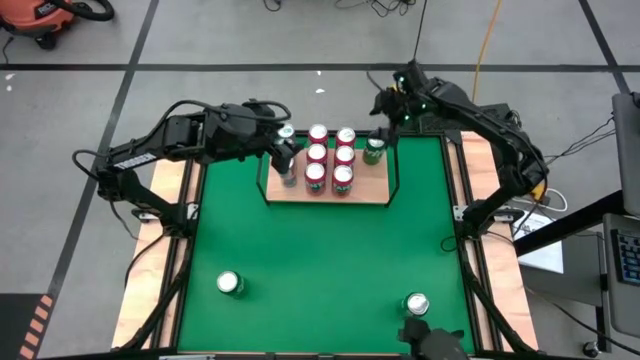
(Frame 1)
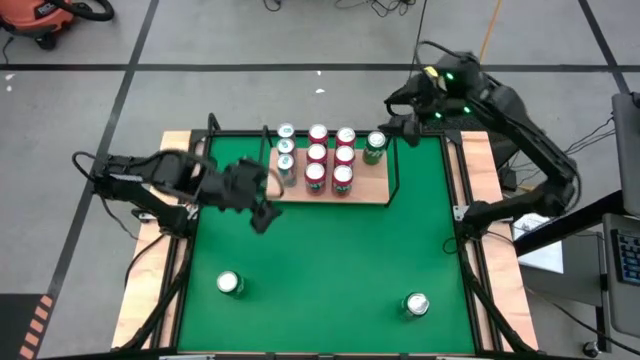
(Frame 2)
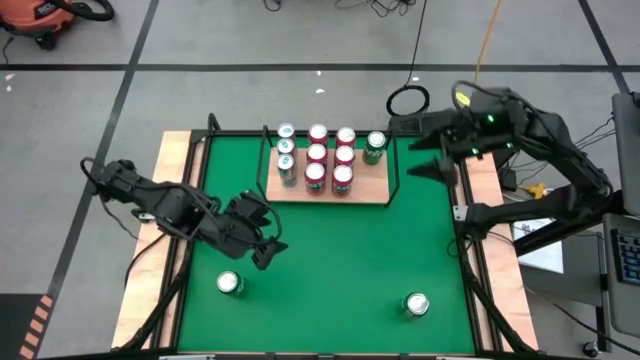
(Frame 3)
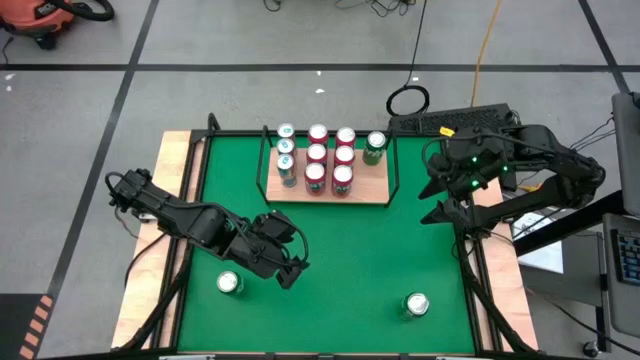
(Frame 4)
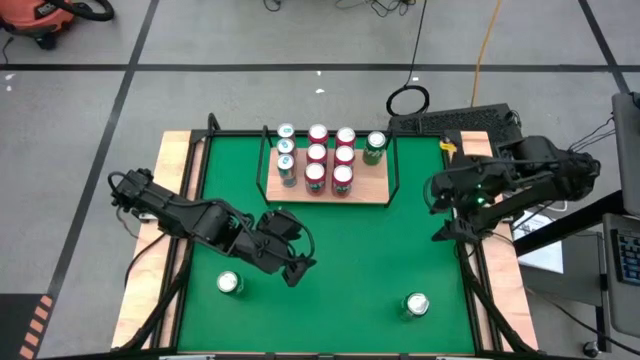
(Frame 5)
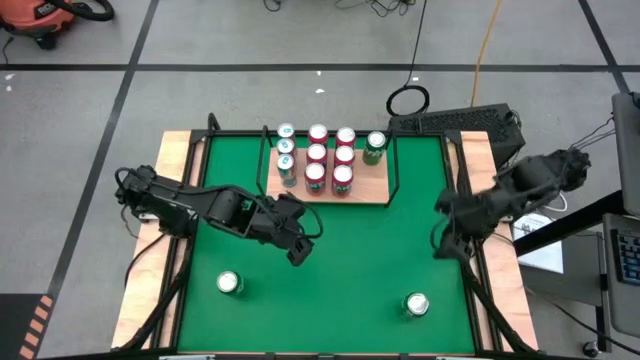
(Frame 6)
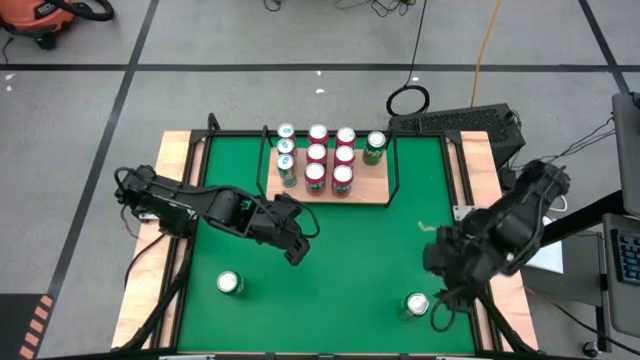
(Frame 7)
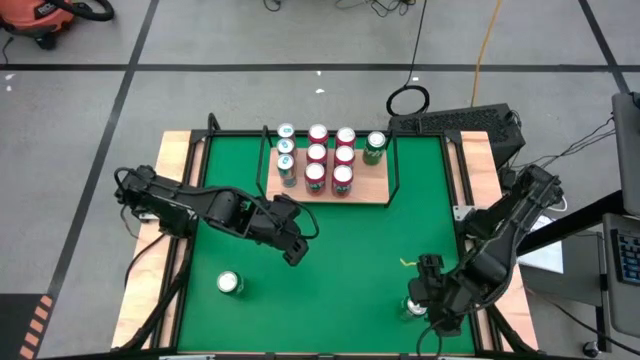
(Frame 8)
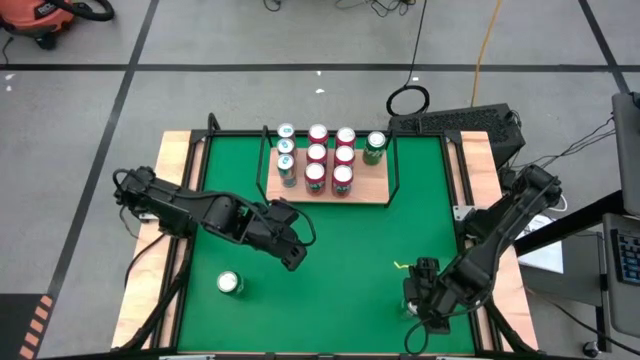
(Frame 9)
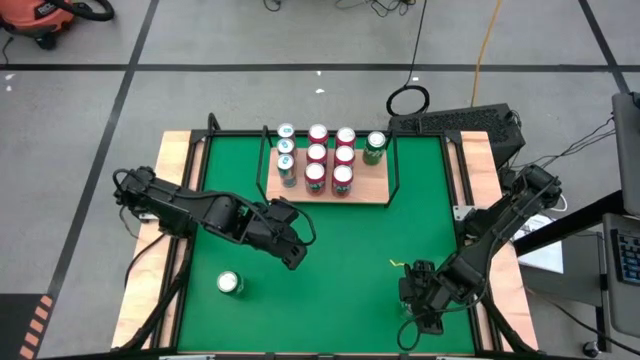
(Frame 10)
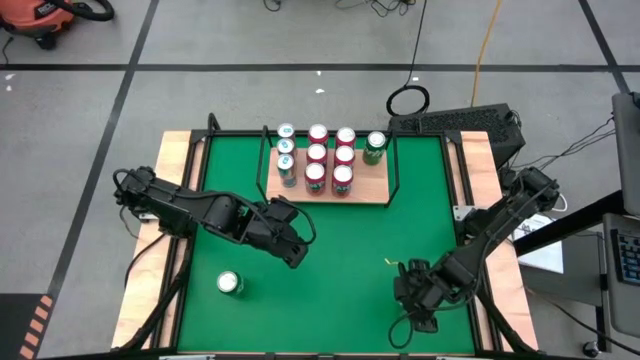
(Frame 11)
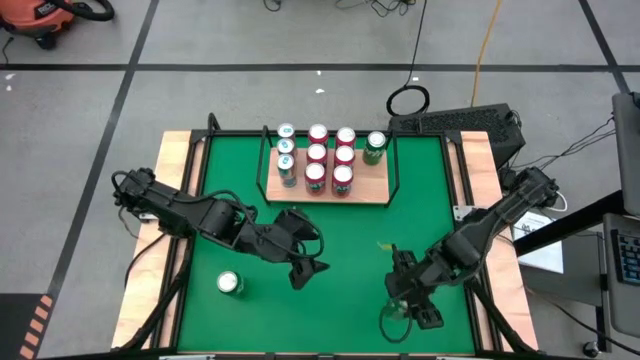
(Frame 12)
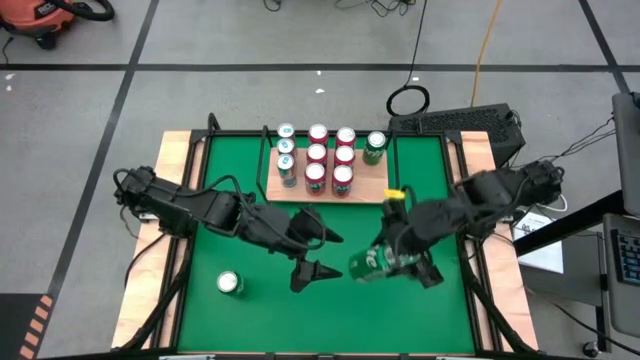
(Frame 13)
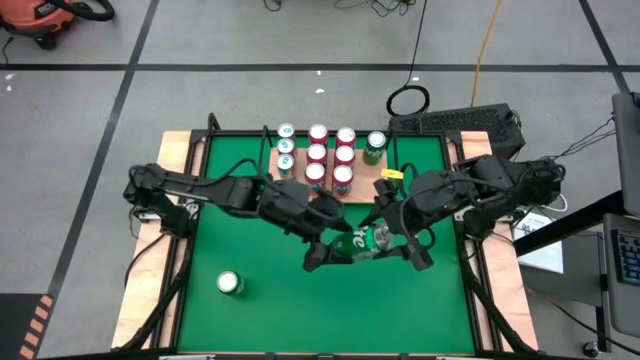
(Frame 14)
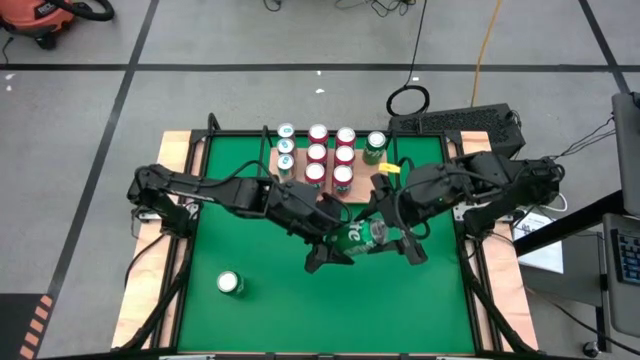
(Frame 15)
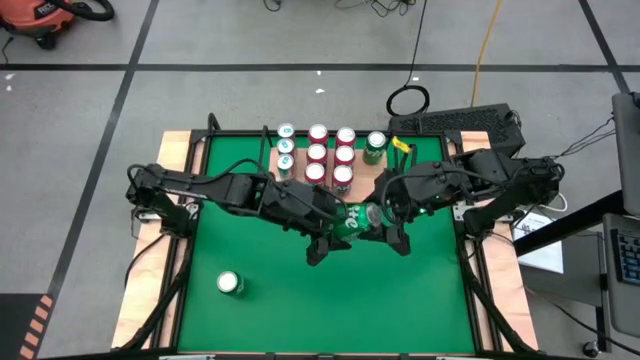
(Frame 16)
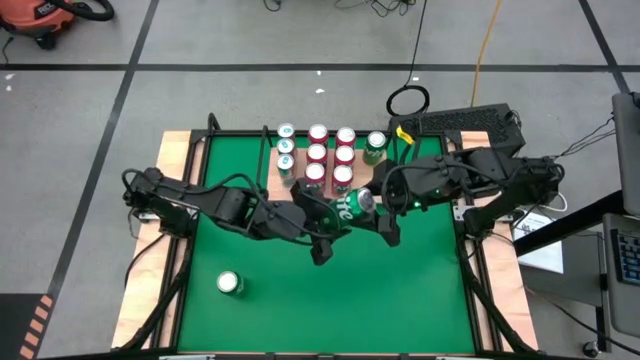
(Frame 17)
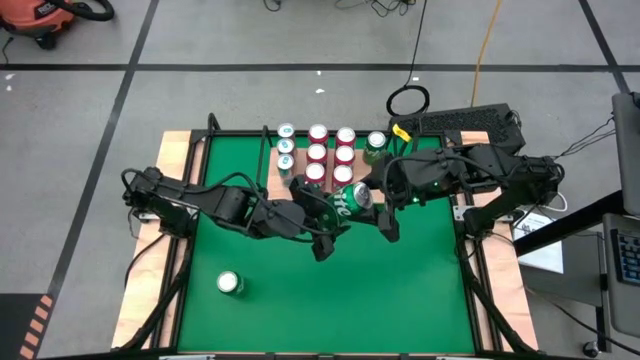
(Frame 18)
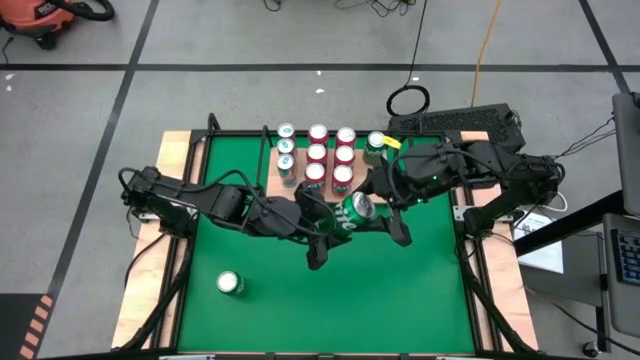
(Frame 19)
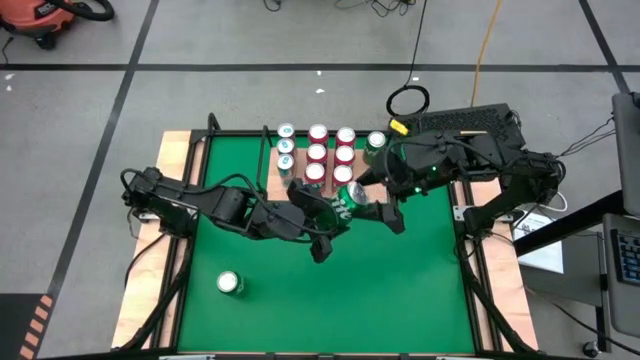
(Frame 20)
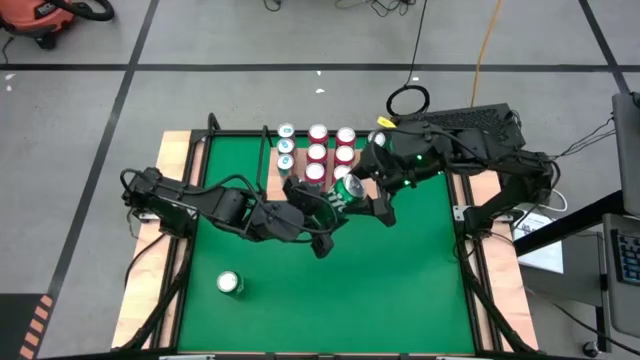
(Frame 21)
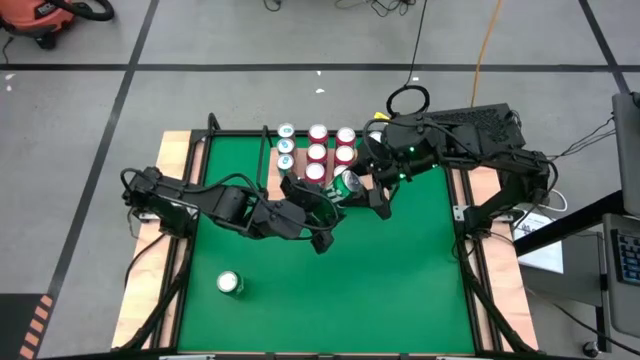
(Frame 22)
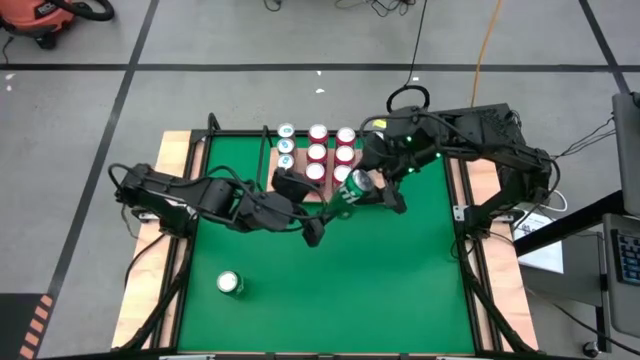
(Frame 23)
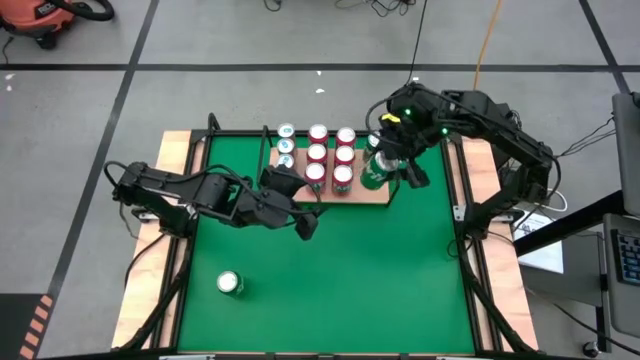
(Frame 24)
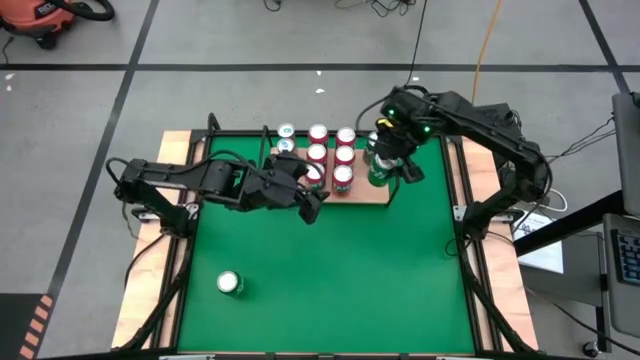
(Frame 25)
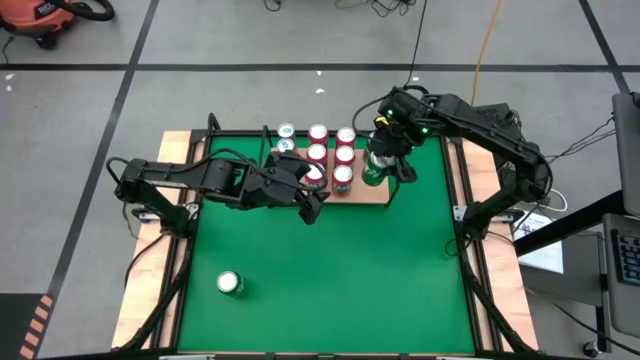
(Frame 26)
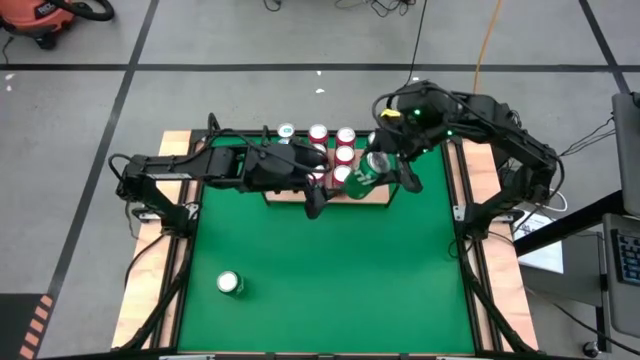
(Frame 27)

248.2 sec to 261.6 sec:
Task: Place canned beverage on shelf
Put the green soda can on the shelf aligned with the other green soda can

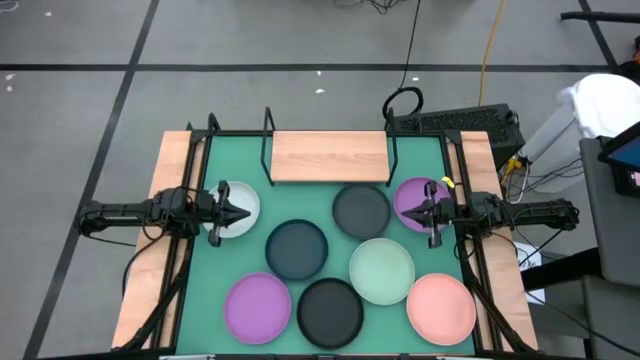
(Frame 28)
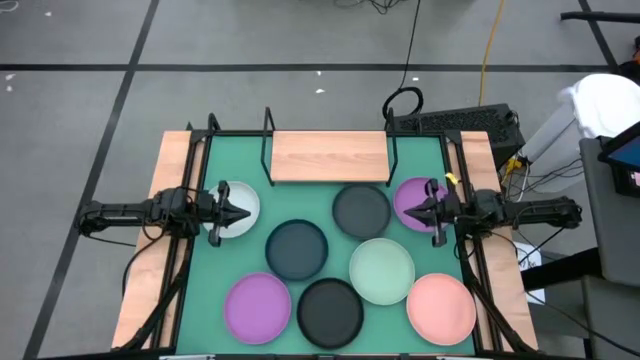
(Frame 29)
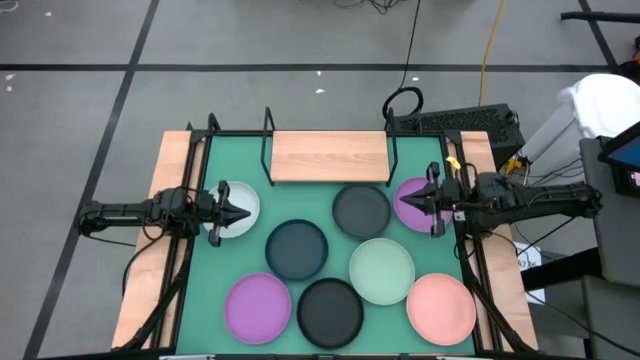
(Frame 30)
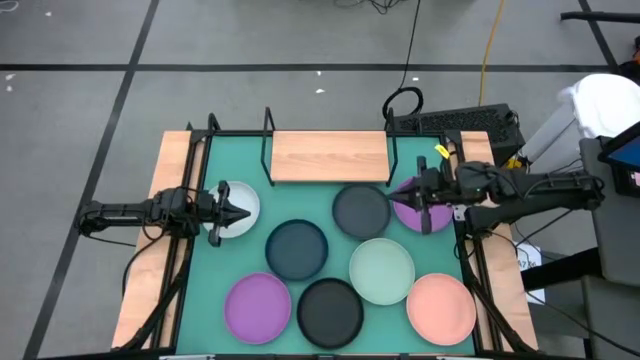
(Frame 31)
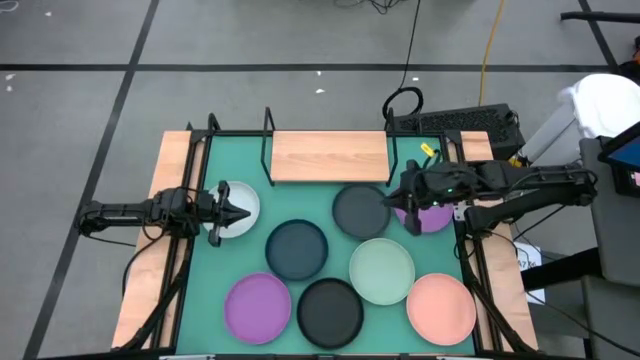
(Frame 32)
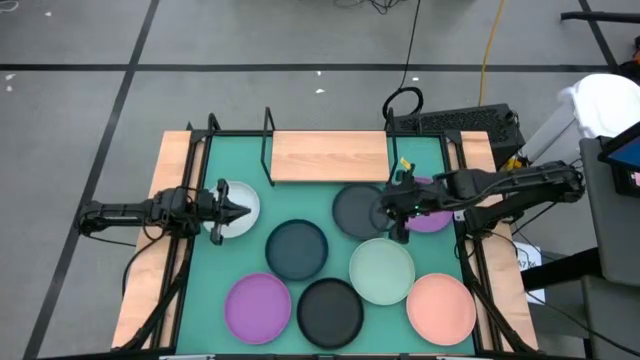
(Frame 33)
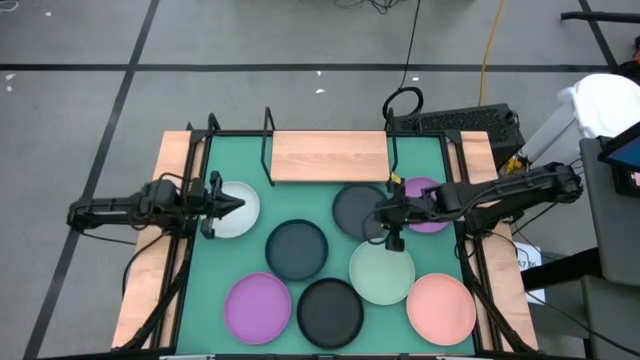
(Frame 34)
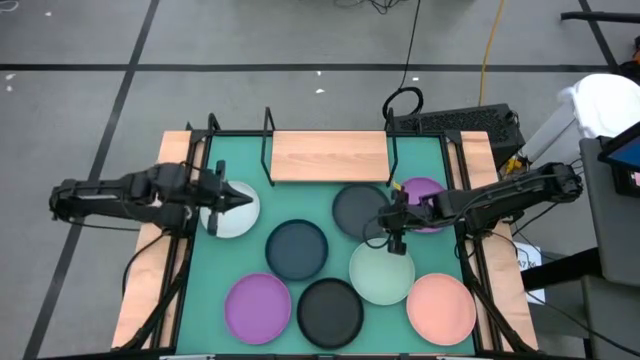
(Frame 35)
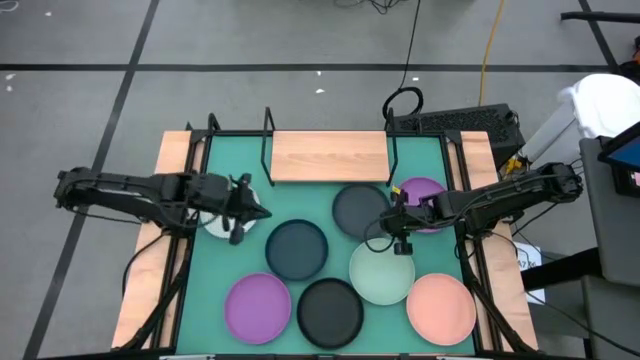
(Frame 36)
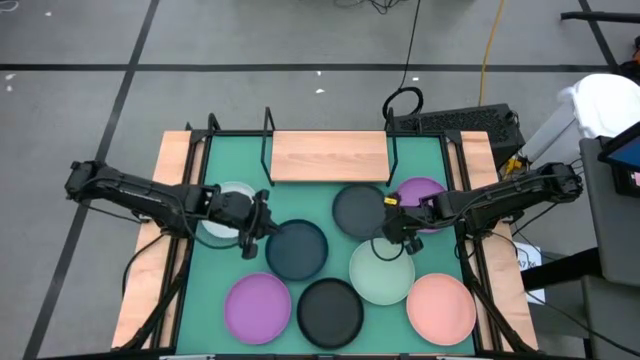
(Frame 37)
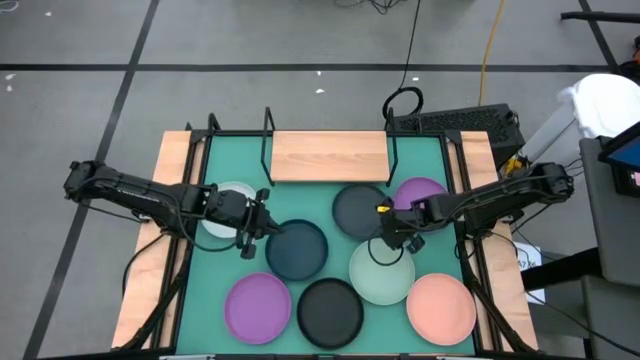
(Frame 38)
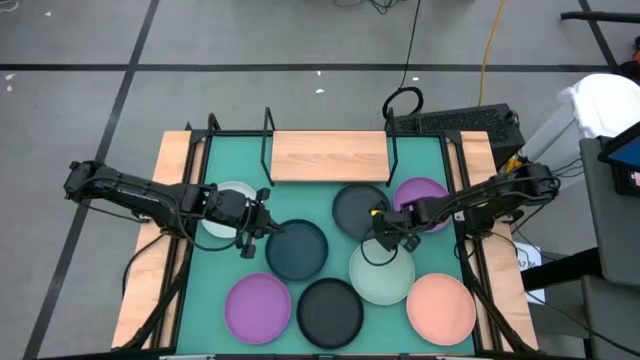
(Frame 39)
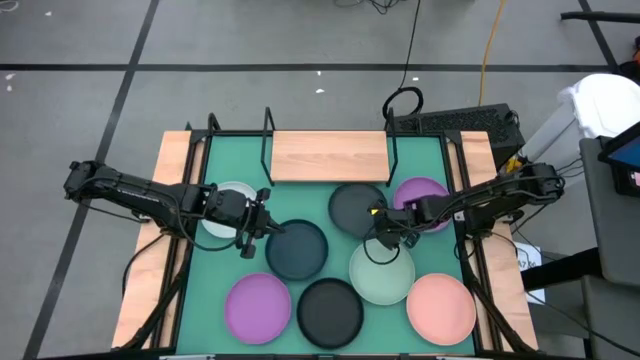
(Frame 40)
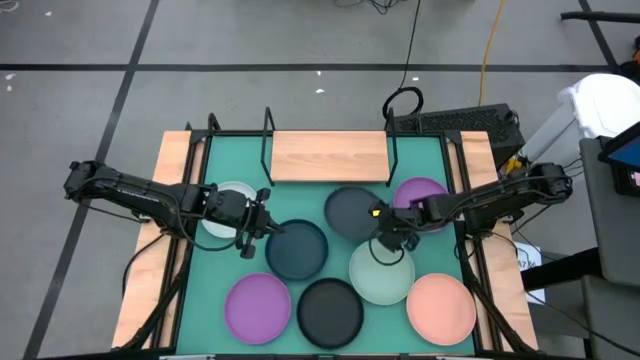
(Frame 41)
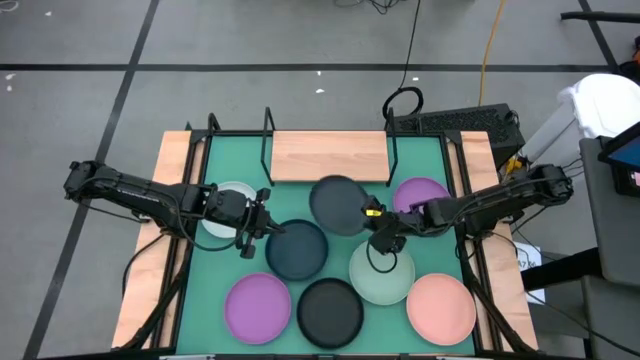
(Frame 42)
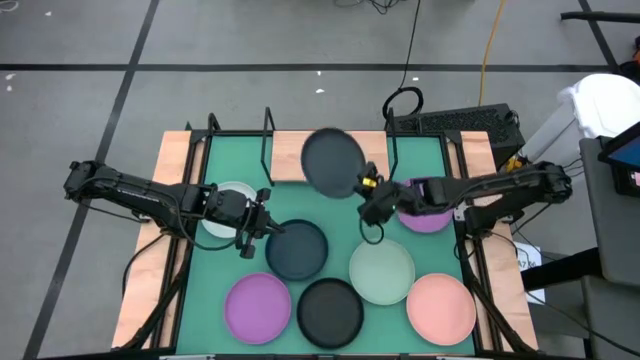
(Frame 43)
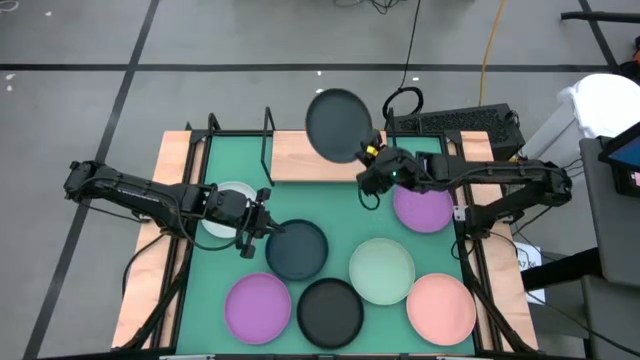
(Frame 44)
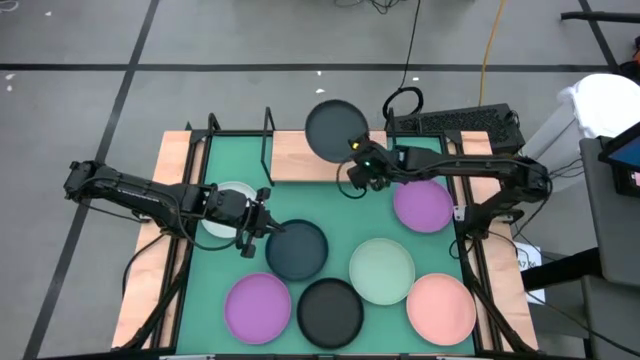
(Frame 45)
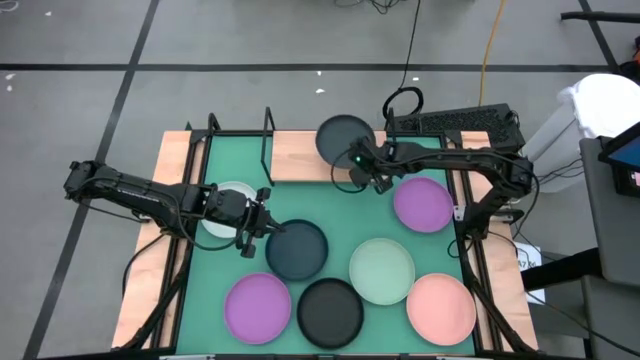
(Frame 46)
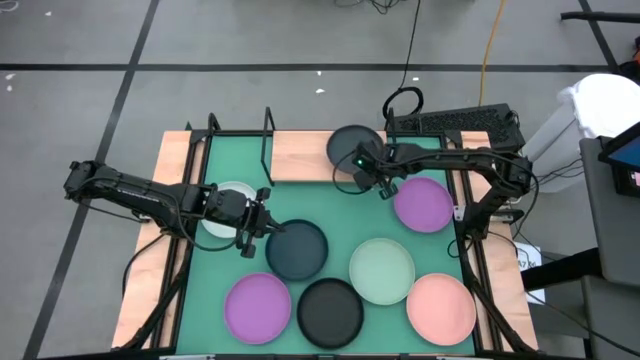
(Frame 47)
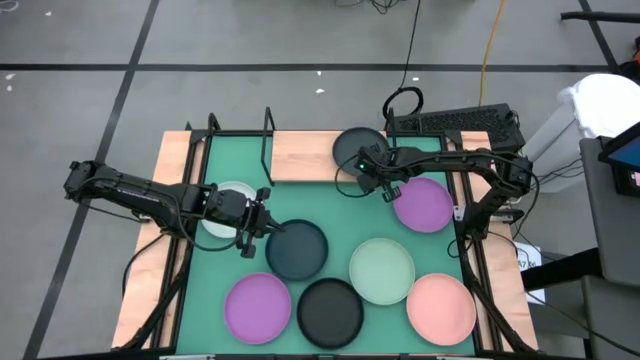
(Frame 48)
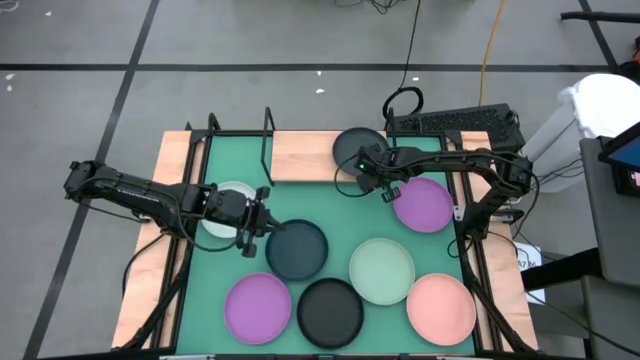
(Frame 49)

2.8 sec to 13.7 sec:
Task: Place and stack plates onto a shelf
Put the top black plate on the shelf
